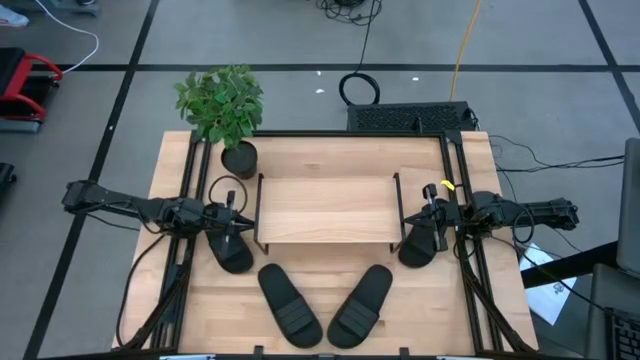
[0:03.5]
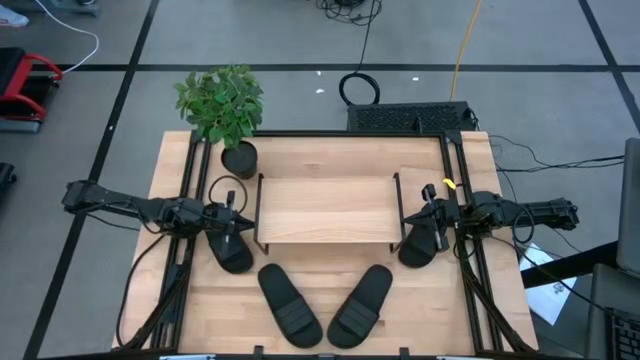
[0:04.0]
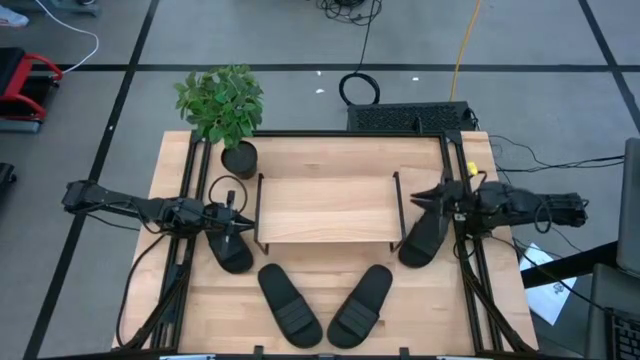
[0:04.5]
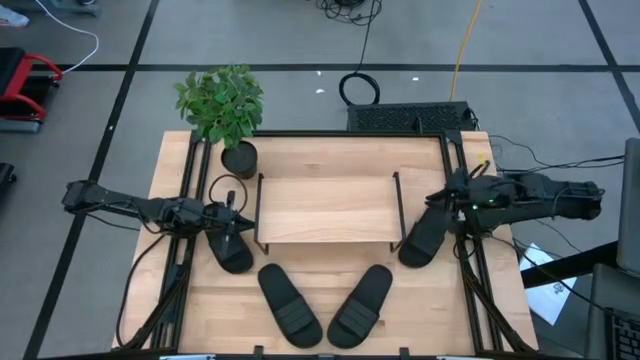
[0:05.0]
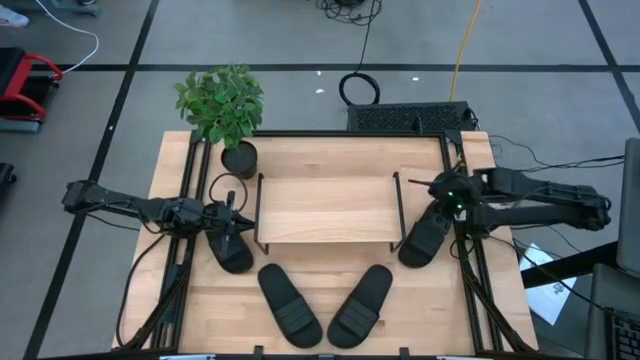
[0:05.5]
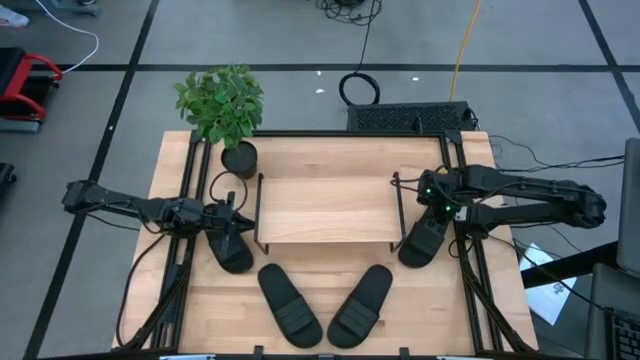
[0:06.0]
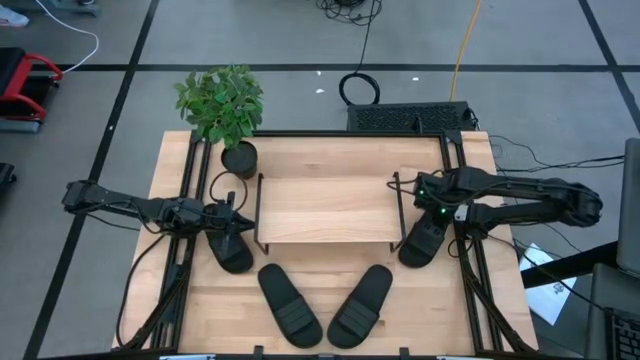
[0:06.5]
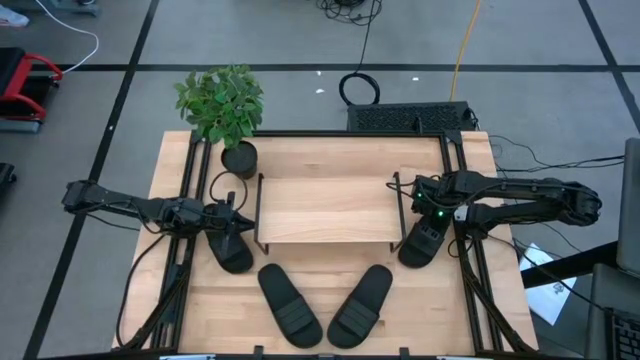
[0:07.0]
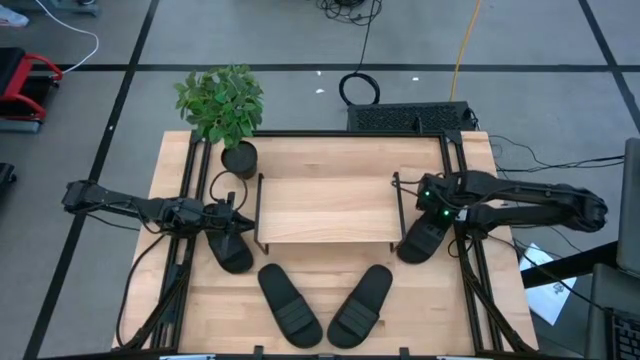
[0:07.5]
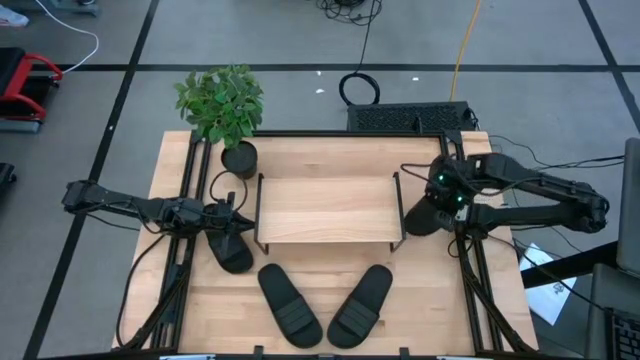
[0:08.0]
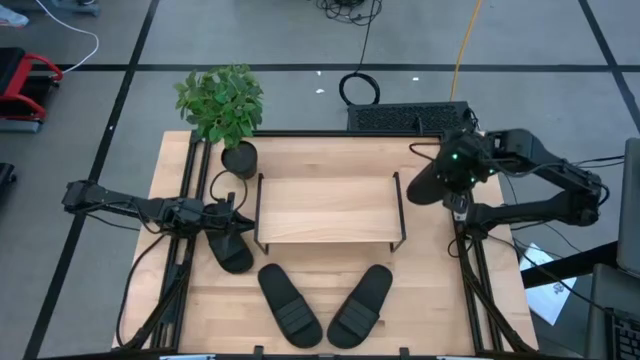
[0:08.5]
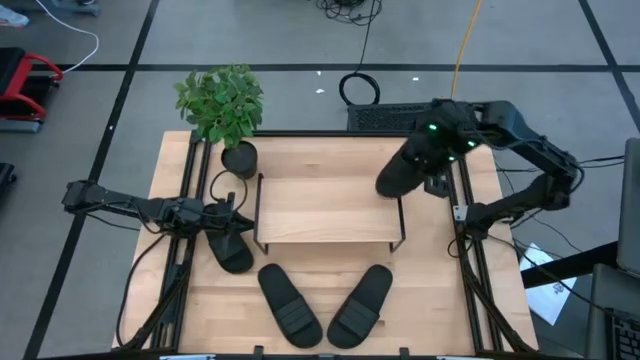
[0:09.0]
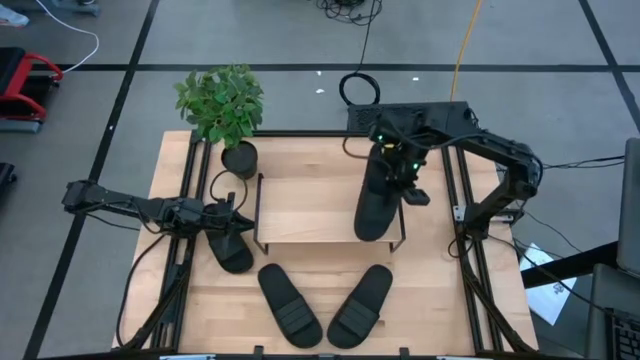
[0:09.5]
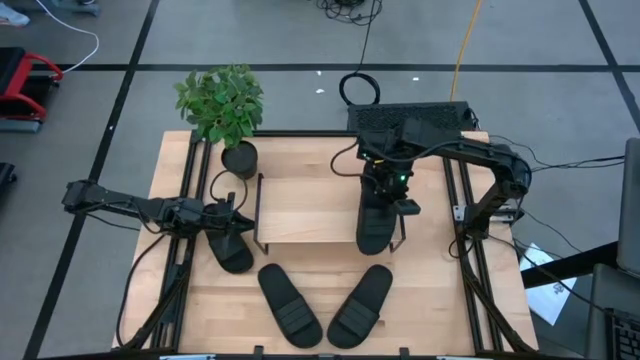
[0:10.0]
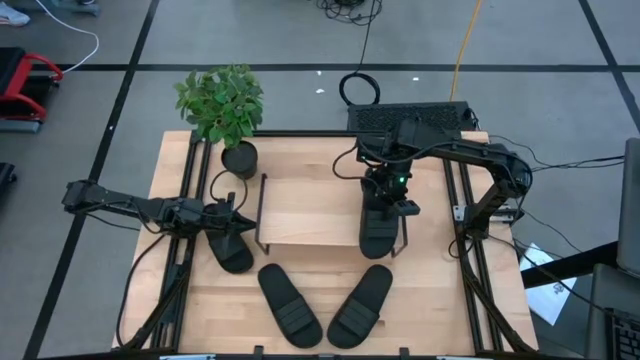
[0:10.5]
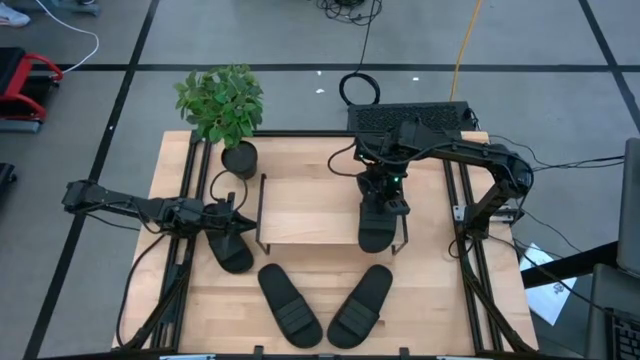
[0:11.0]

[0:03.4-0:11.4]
Task: Pick and place slides into the shelf
Put the top right black slide on the shelf

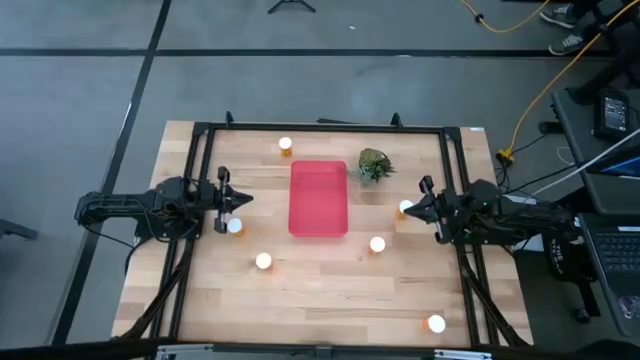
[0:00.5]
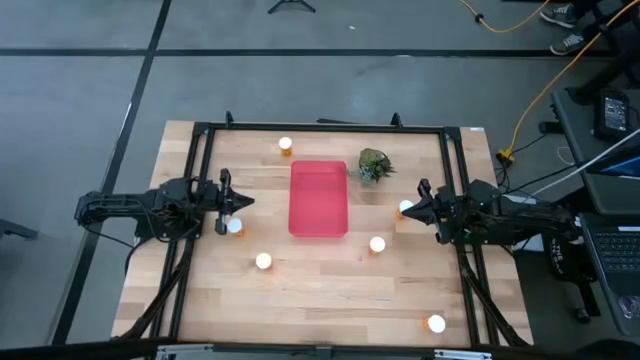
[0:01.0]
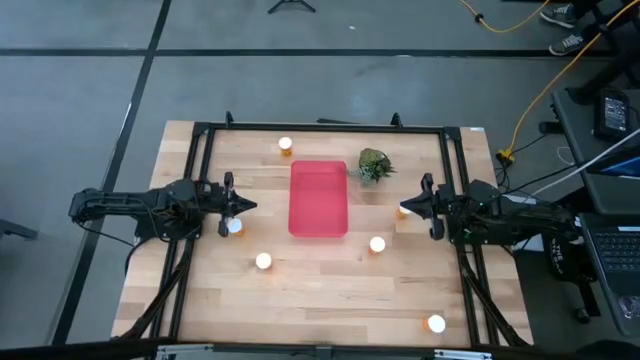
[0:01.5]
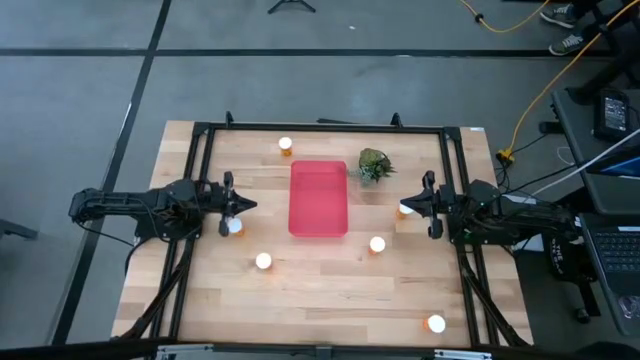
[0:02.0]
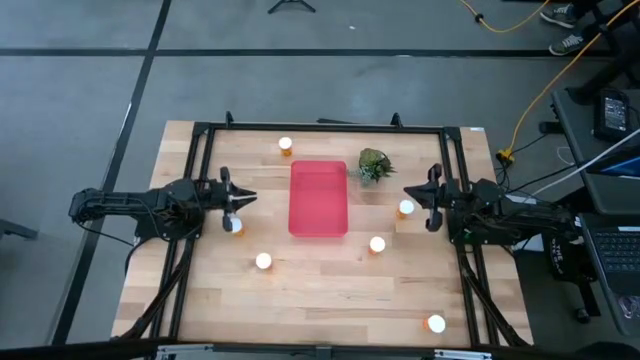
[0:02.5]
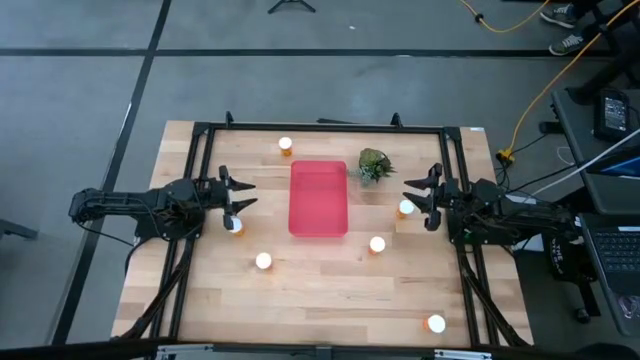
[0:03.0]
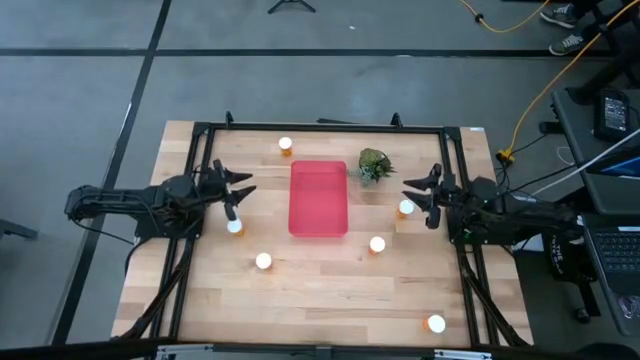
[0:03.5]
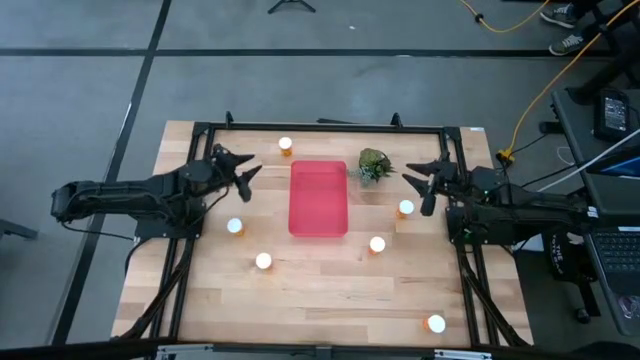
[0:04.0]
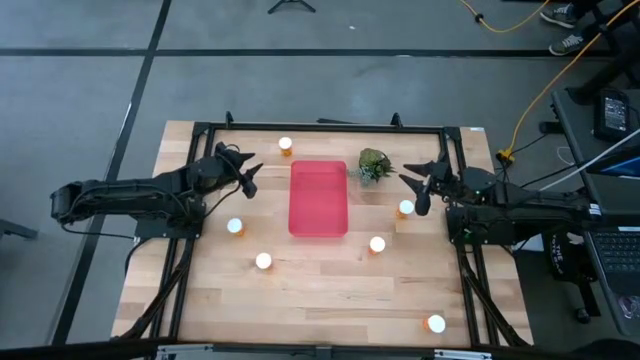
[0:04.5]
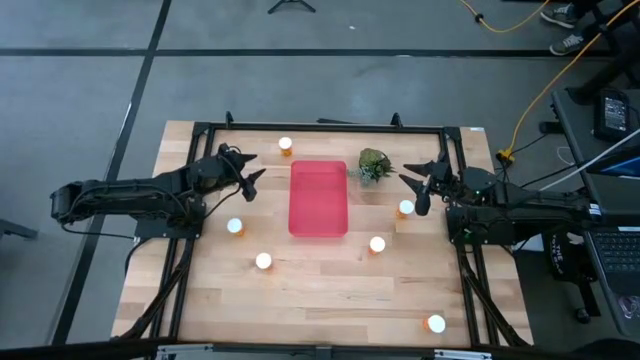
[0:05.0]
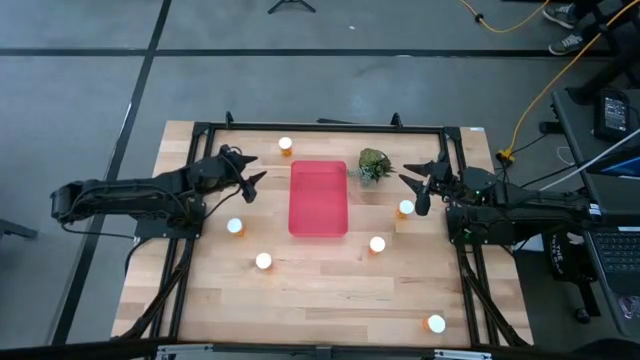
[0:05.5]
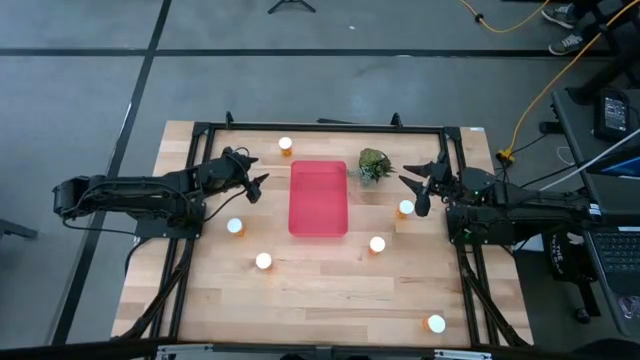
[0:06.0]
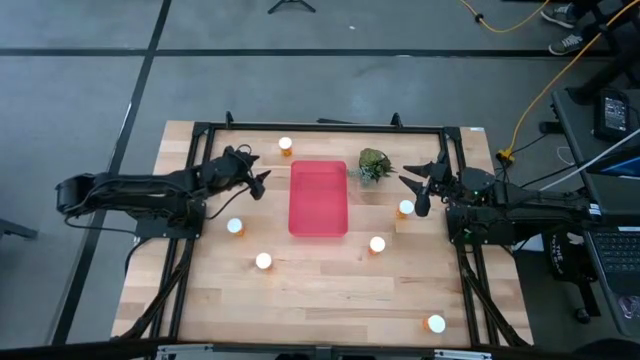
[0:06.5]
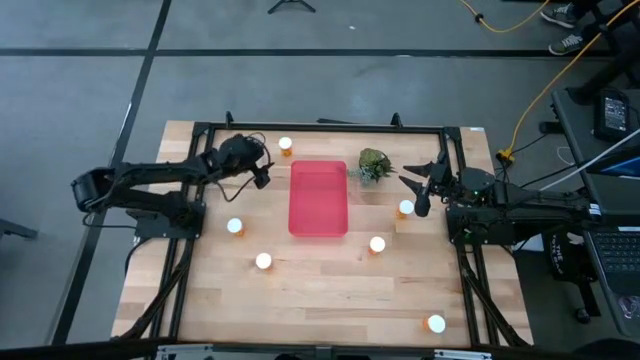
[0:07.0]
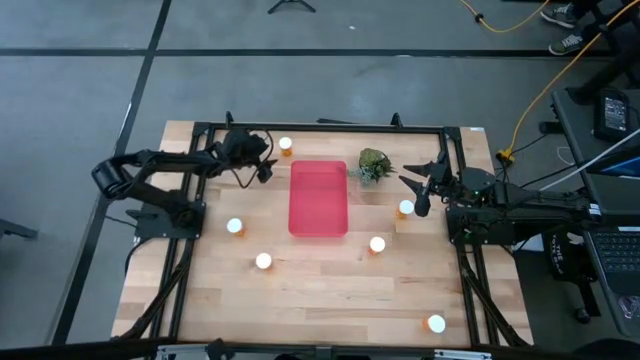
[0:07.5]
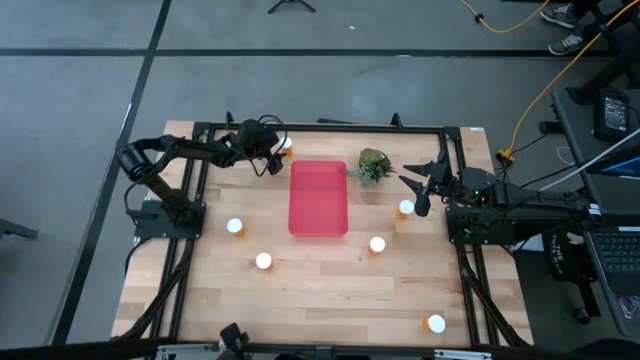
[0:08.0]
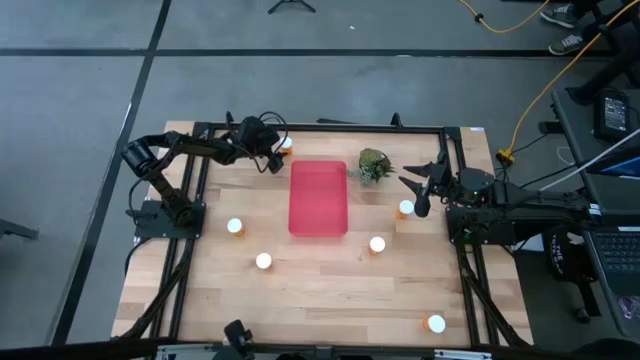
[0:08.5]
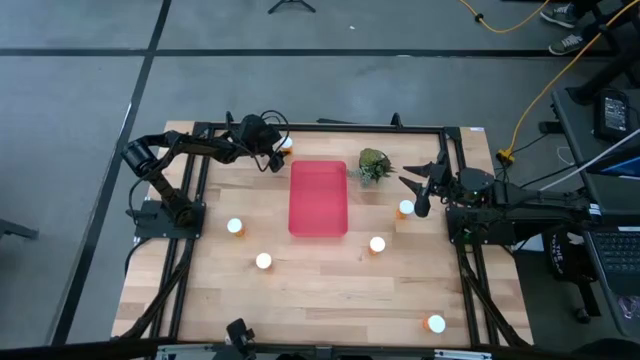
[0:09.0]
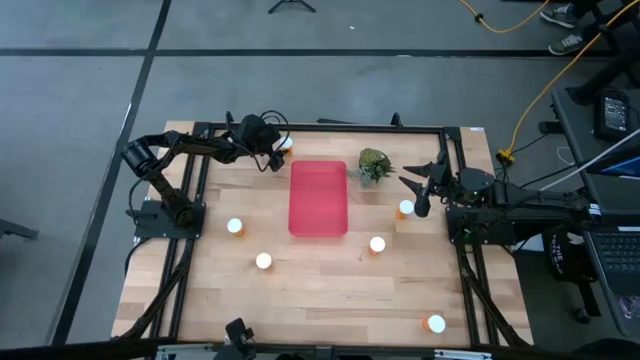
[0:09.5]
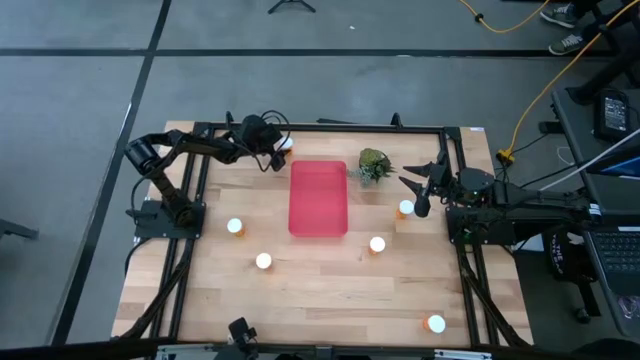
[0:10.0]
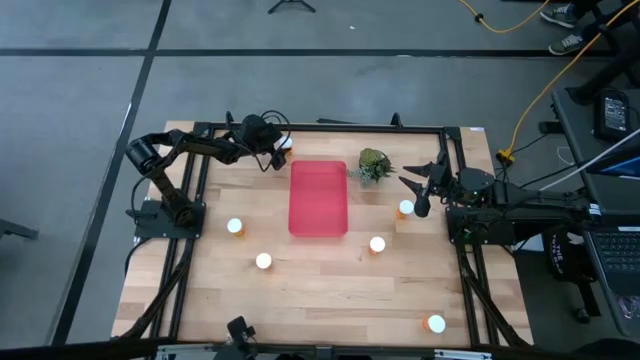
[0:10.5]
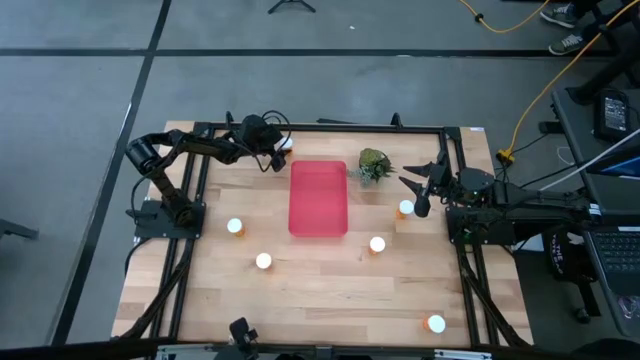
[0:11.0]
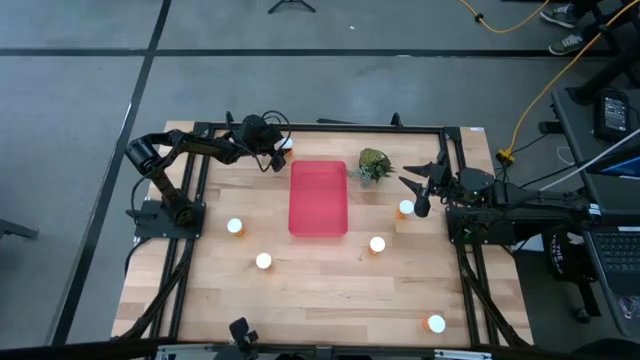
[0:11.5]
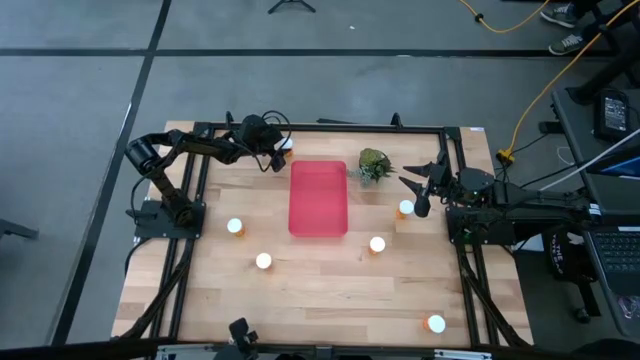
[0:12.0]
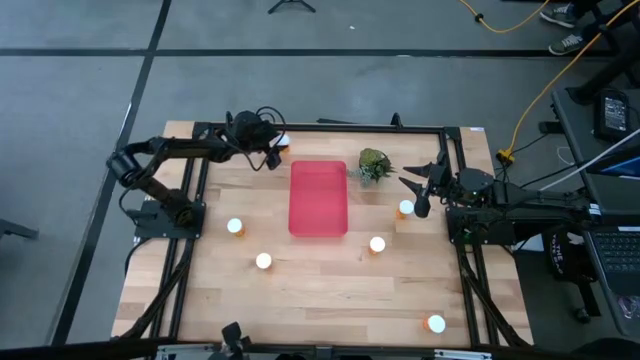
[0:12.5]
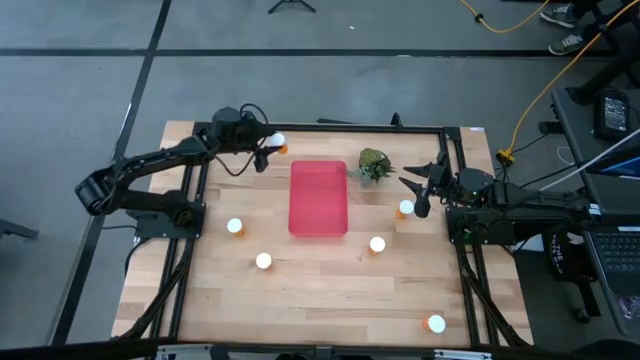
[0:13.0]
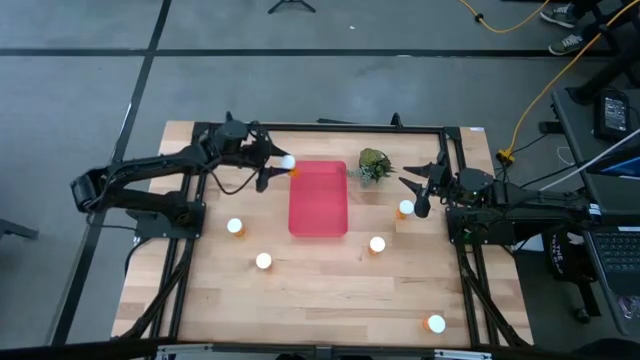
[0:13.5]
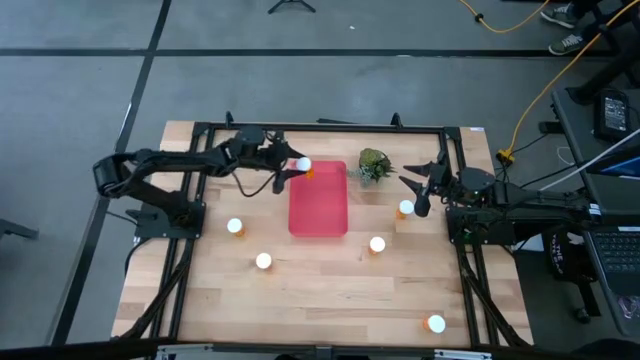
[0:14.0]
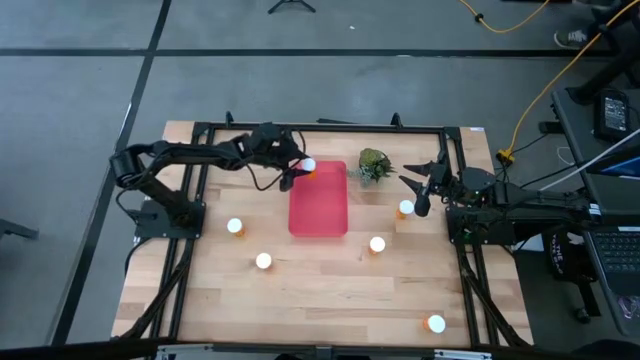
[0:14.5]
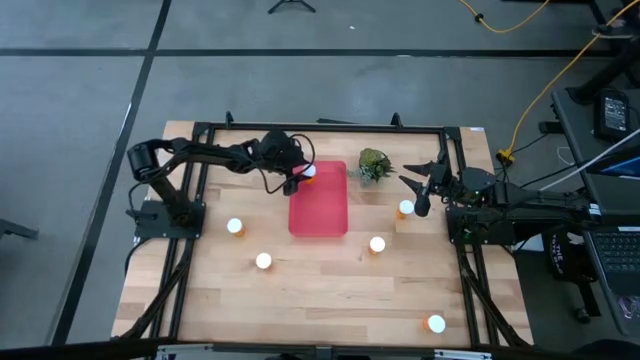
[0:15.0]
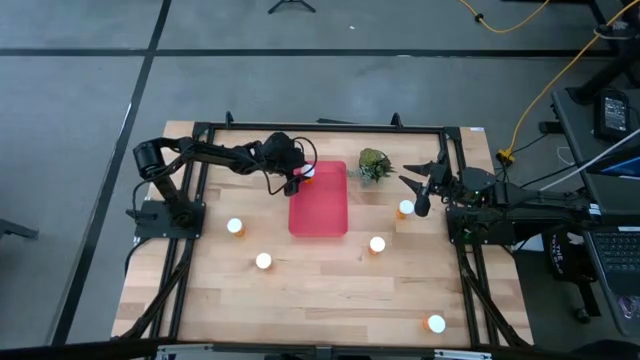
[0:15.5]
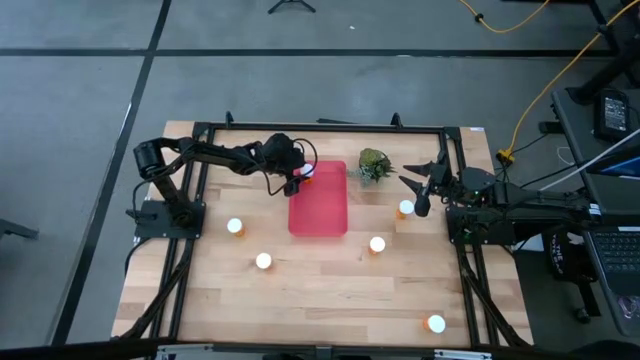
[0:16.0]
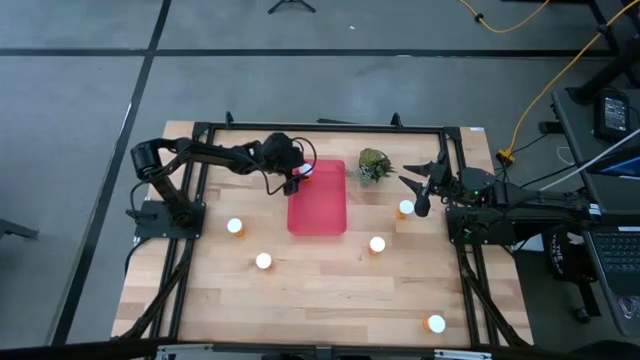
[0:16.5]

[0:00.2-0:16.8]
Task: Pick and place pill bottles into a basket
Put the orange pill bottle into the red bin
